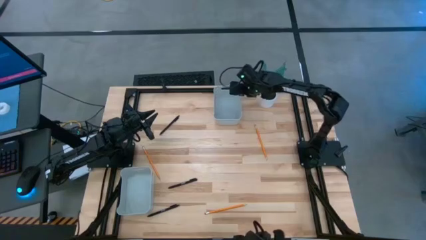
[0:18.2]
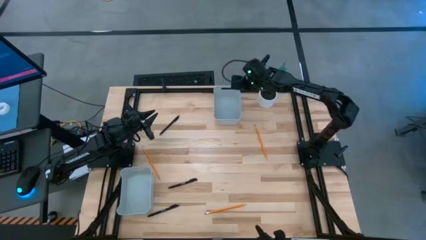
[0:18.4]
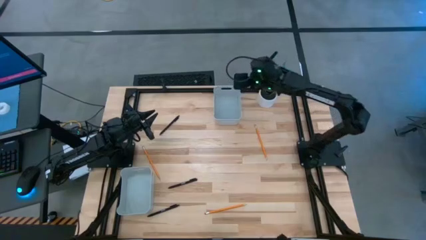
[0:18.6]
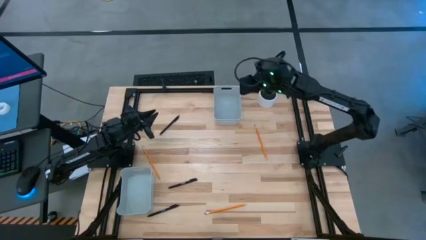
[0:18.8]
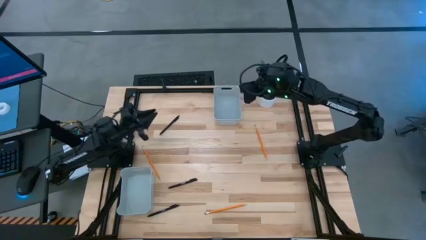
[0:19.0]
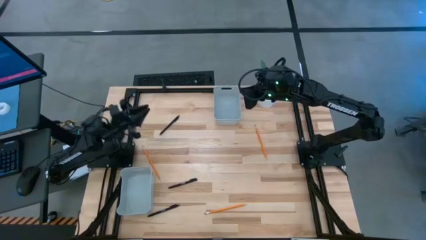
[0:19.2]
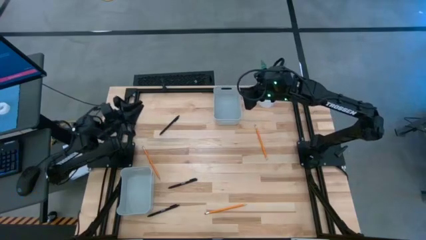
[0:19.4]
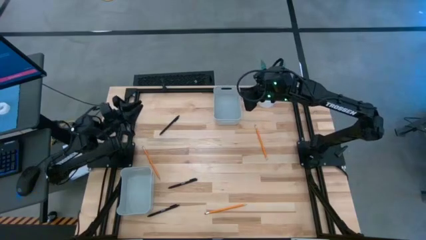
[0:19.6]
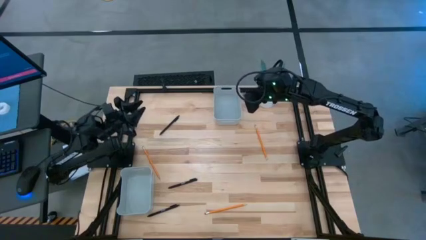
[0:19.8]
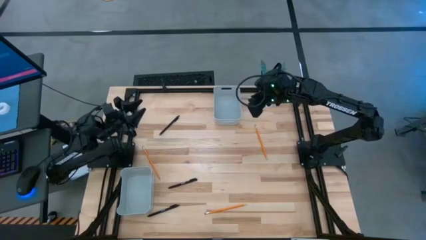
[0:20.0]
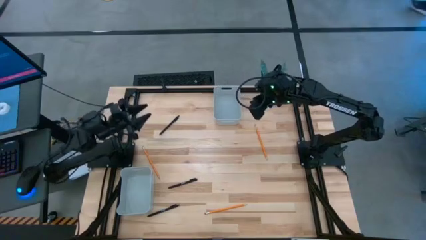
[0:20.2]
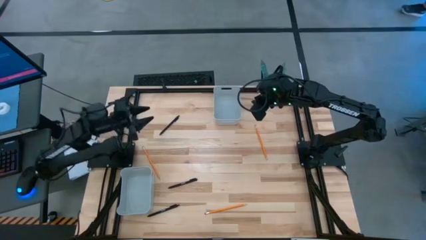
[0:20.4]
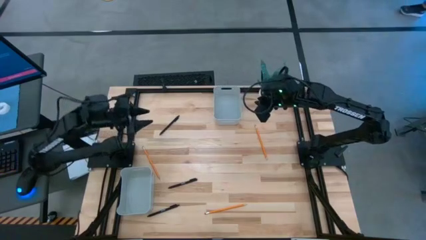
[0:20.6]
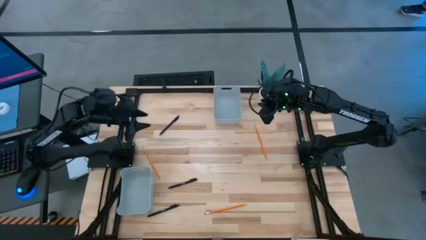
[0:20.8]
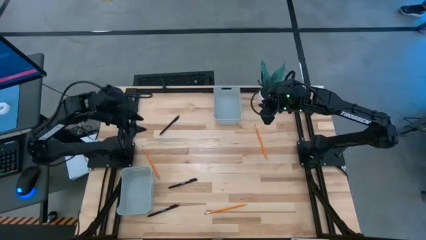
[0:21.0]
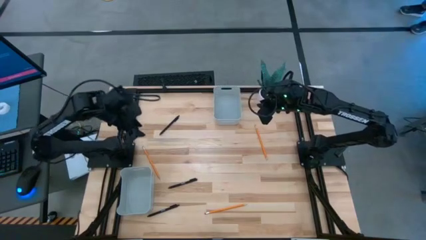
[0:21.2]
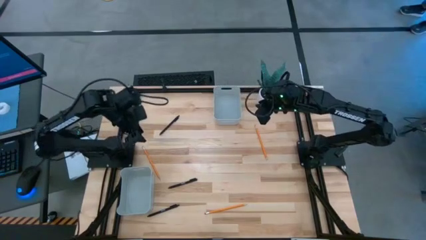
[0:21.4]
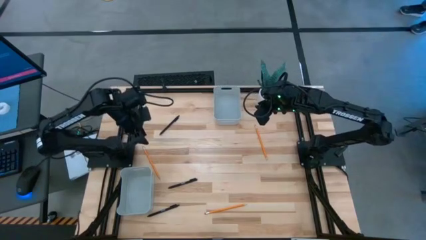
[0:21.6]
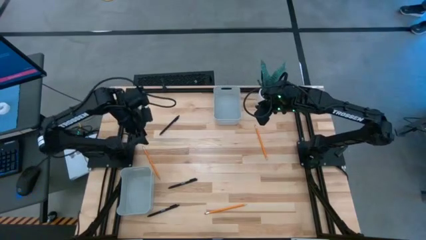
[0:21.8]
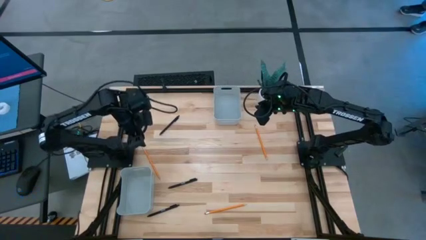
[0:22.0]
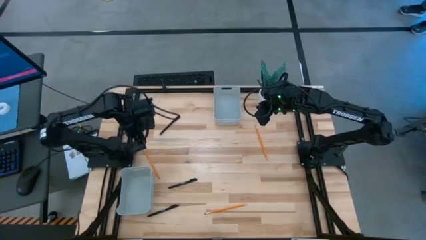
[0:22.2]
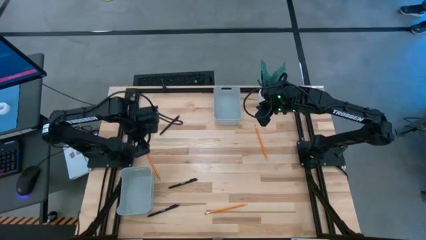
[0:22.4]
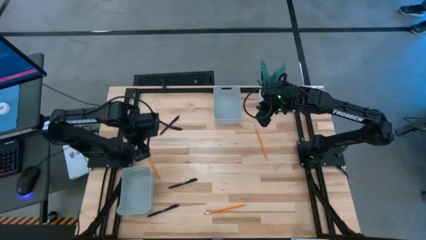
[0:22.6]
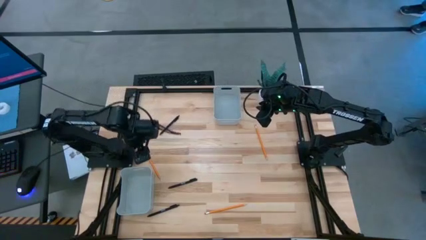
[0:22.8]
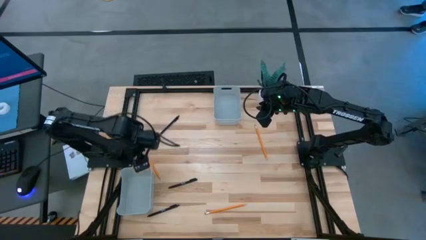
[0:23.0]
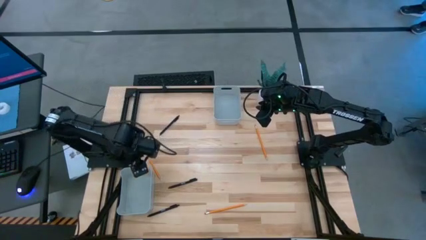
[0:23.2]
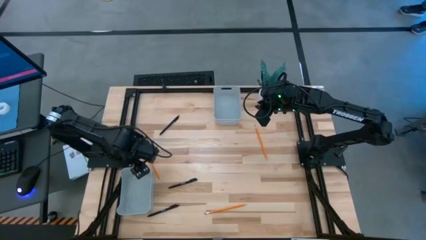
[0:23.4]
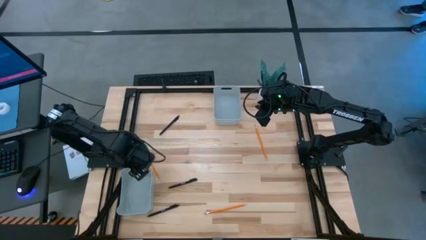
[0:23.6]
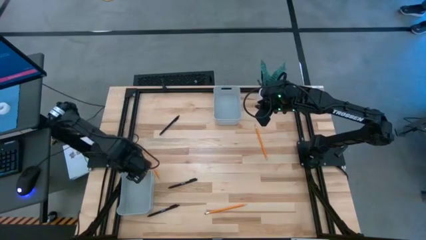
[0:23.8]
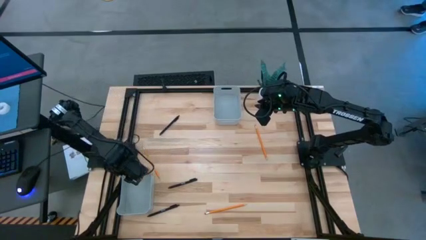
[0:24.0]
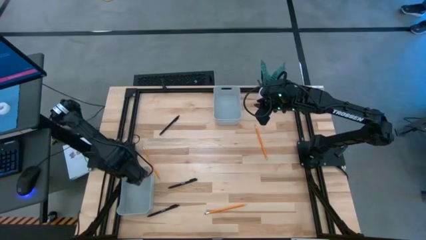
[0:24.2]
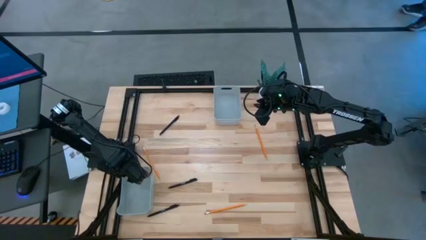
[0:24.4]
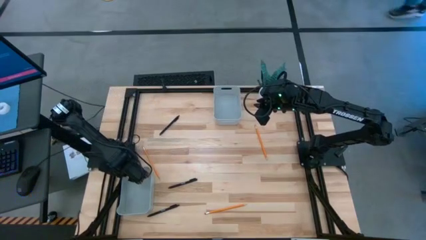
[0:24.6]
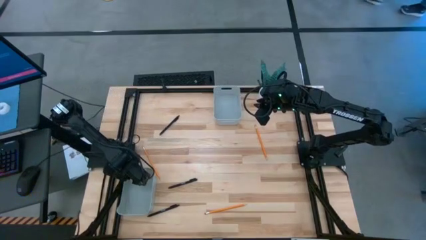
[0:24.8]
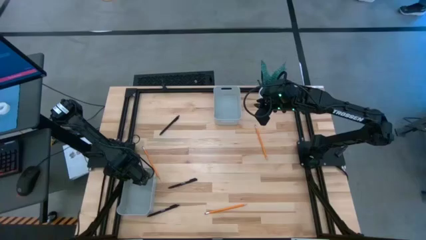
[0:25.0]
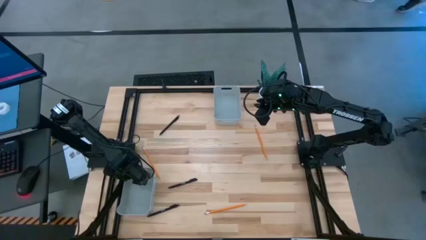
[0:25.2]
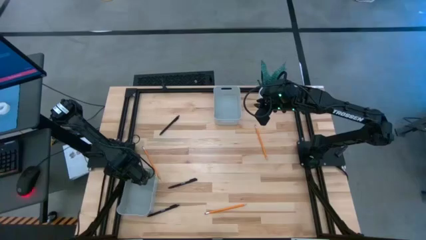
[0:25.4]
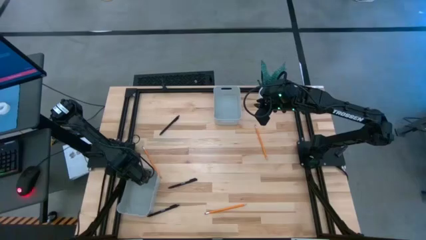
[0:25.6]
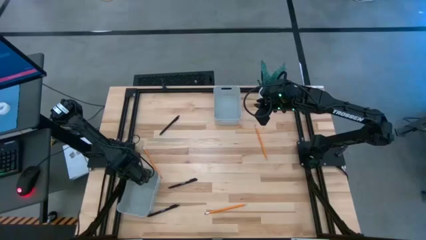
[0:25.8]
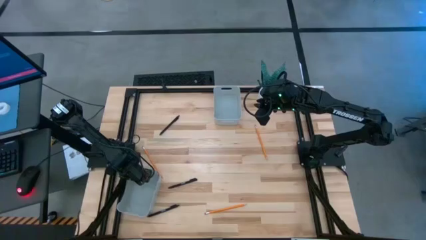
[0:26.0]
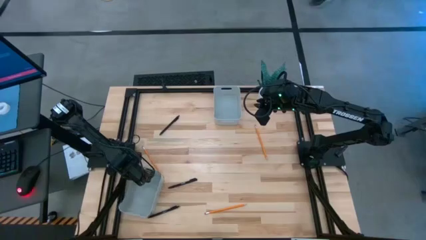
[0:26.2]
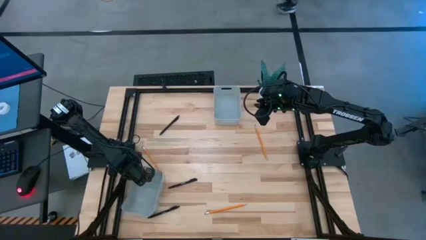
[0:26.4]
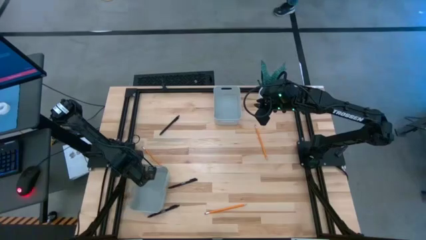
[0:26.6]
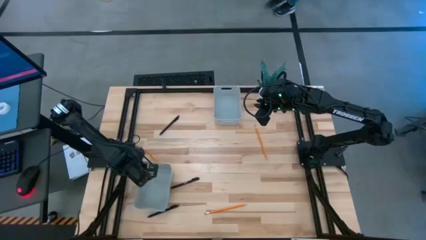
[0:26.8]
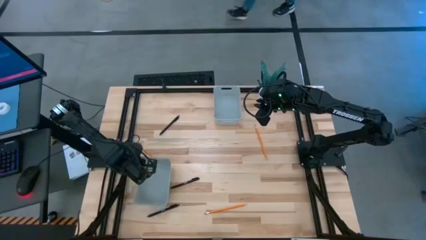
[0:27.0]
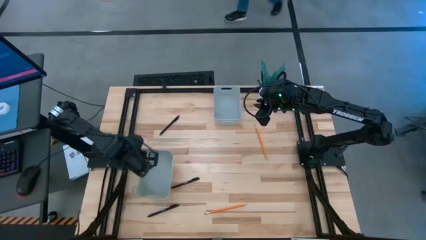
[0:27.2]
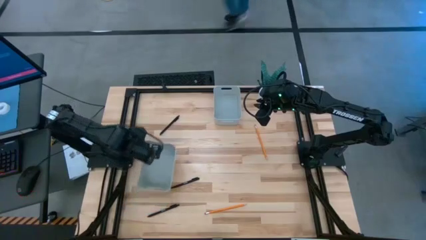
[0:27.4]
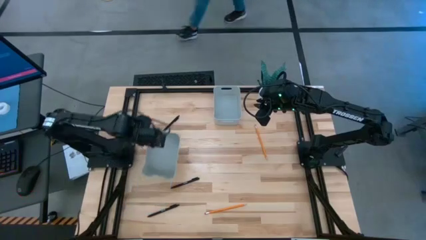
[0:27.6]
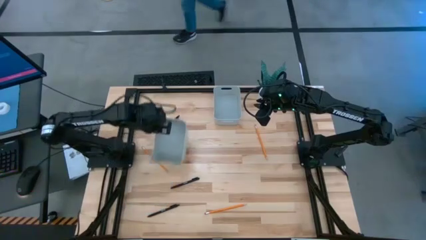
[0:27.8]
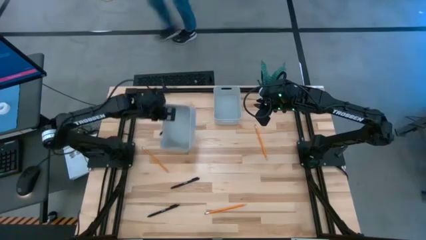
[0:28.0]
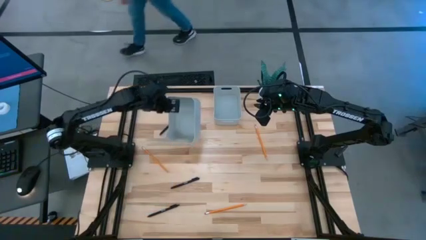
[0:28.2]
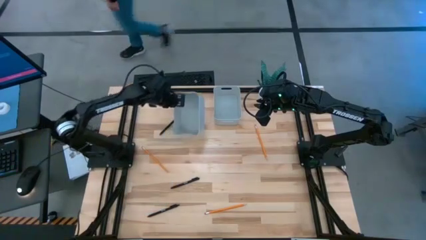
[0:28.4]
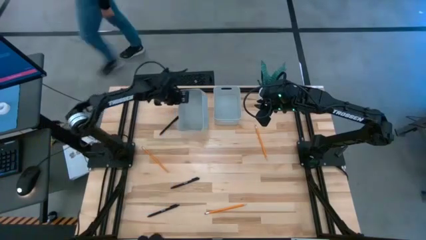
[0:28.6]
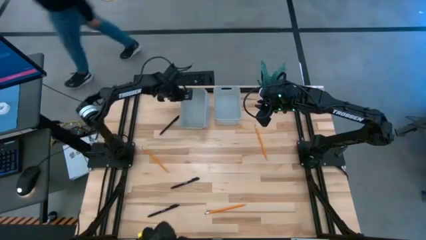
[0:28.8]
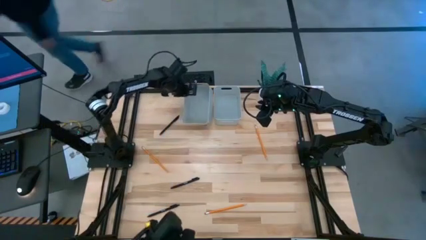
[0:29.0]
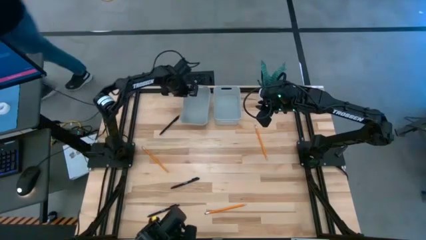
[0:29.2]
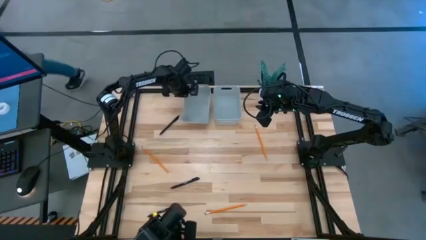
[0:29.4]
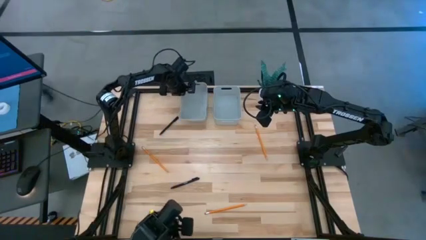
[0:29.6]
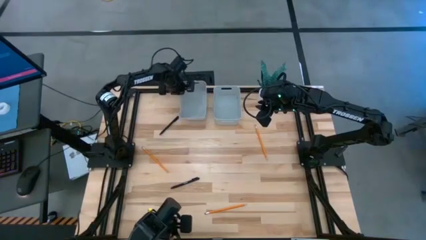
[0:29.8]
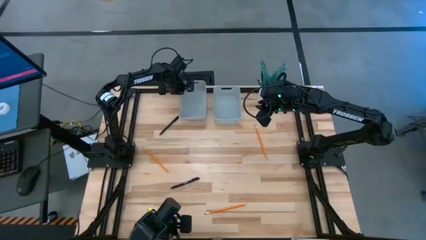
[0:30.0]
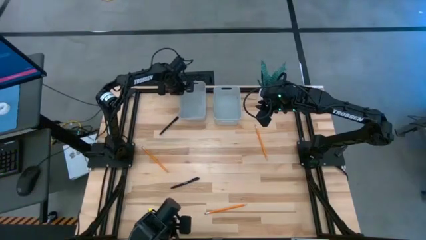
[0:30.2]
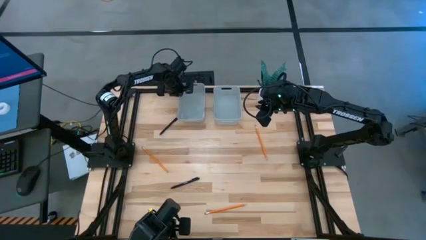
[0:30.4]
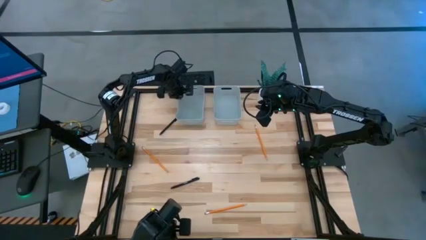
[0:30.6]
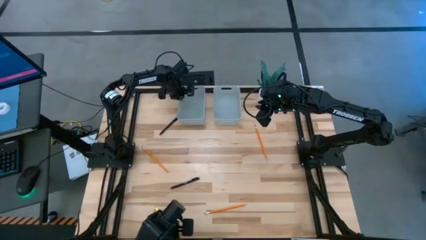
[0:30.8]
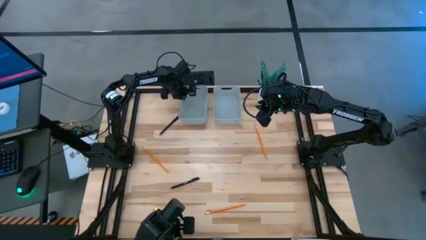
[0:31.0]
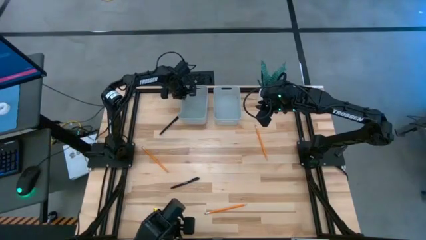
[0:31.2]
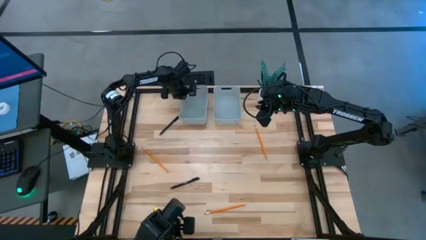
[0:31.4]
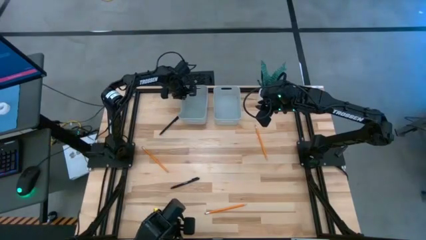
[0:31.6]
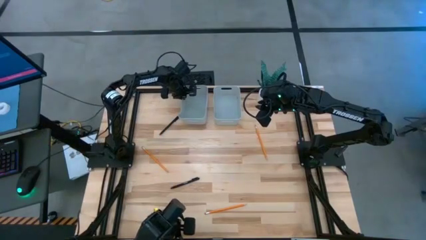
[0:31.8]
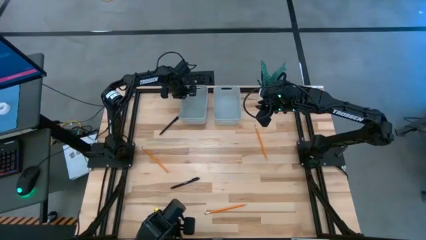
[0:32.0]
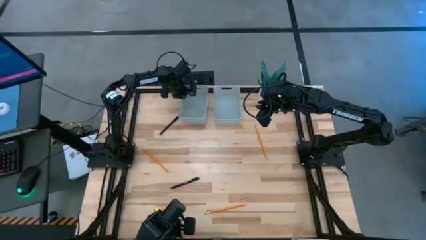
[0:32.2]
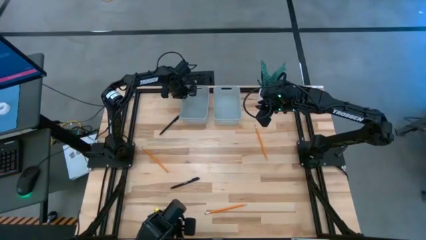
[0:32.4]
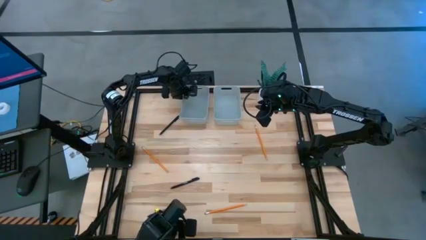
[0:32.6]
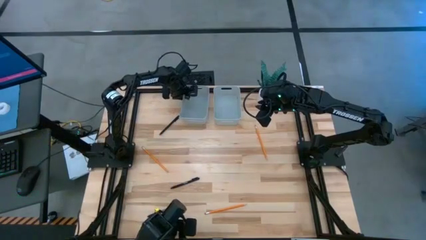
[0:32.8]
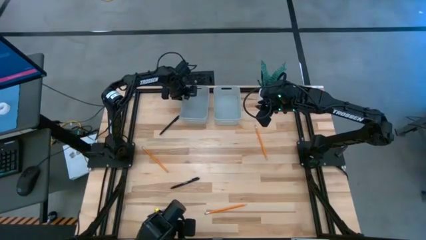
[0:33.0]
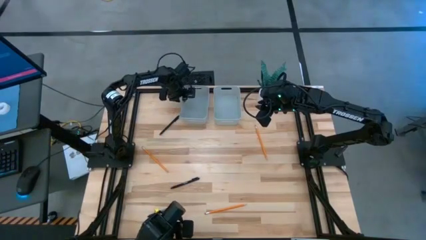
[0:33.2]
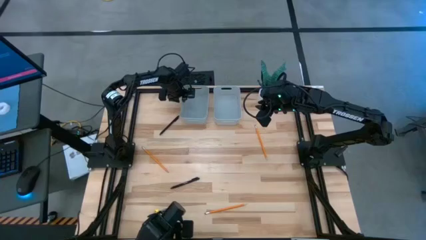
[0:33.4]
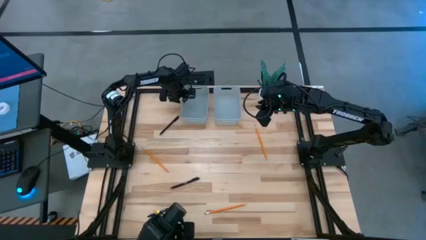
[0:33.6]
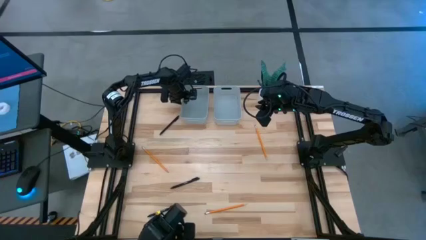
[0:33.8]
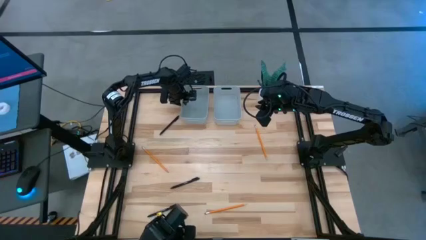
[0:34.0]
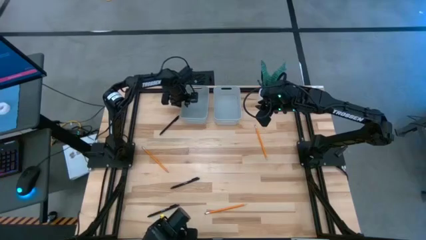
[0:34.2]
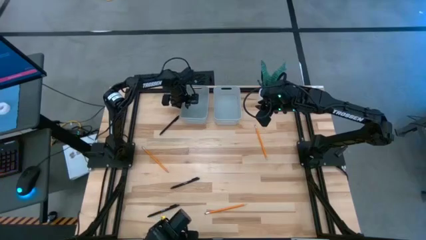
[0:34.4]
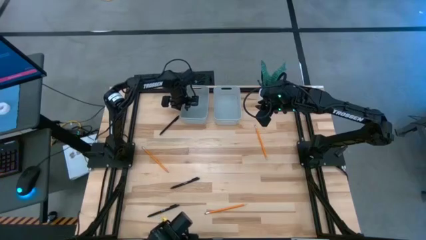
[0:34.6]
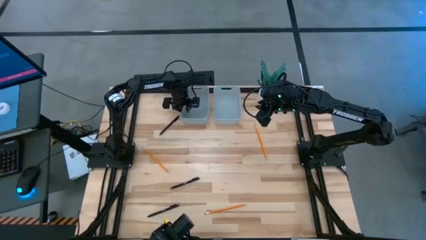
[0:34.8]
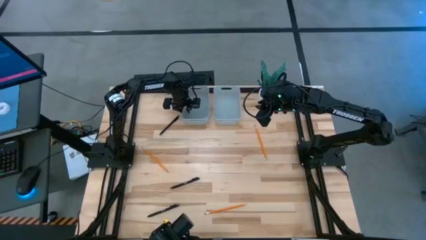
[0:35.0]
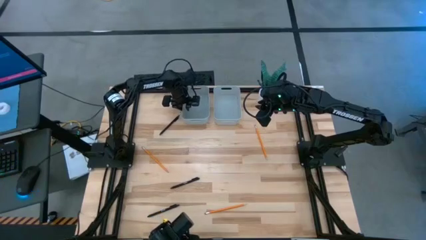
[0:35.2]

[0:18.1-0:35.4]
Task: Sort pens & pencils
Move the bottom gray bin to the top center of the table
